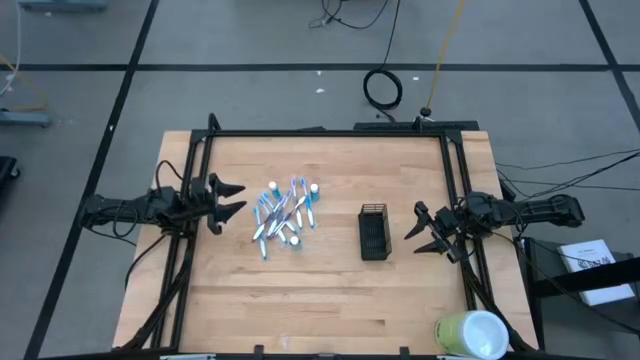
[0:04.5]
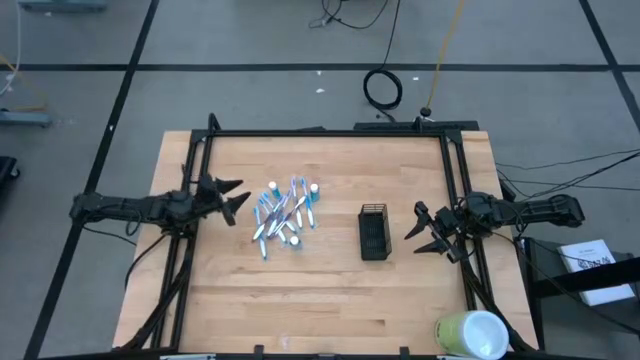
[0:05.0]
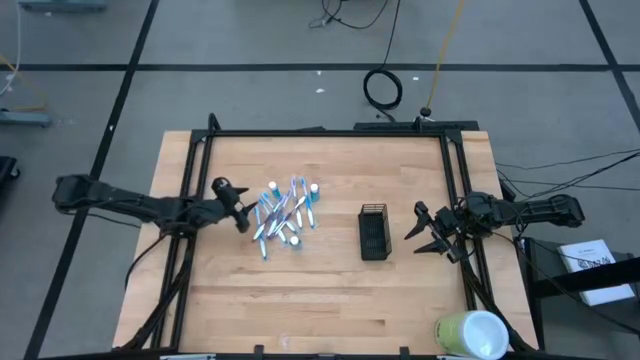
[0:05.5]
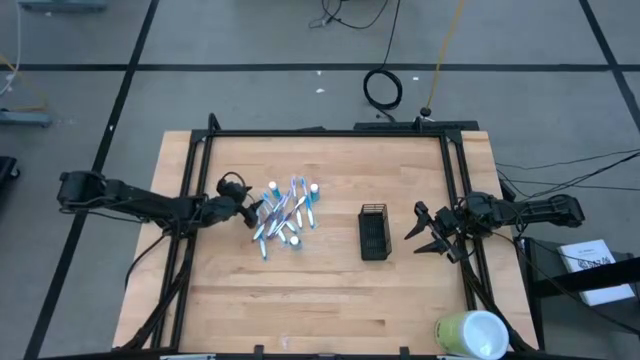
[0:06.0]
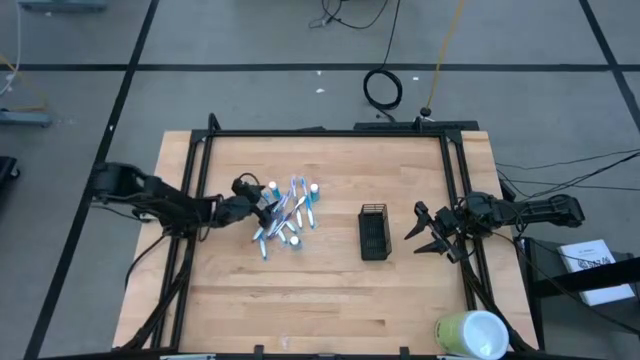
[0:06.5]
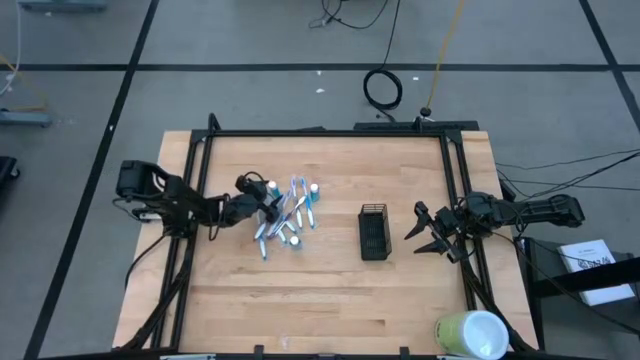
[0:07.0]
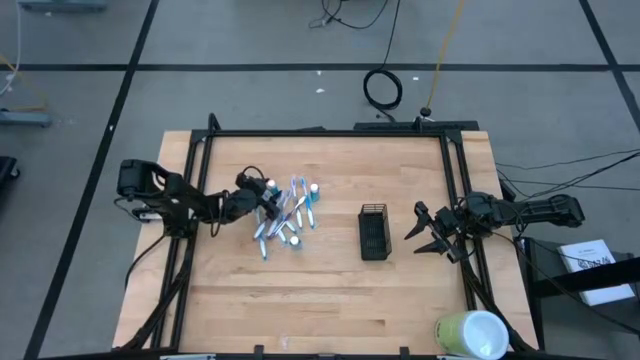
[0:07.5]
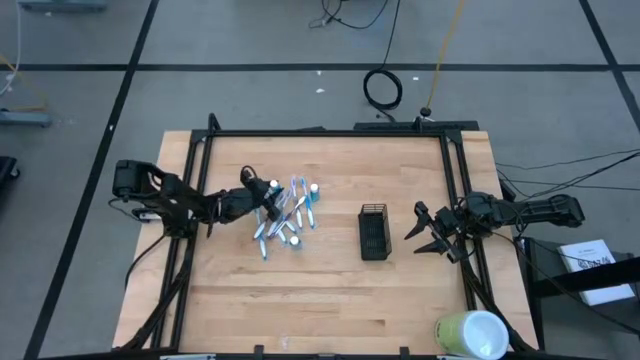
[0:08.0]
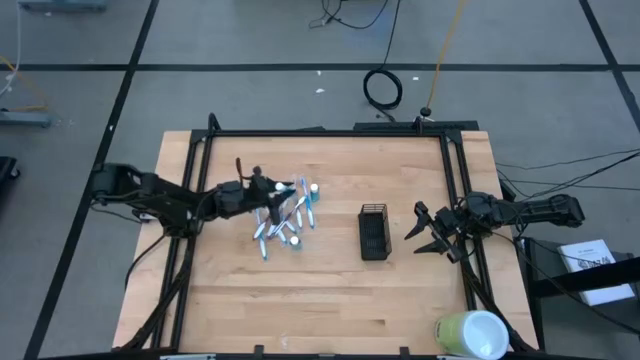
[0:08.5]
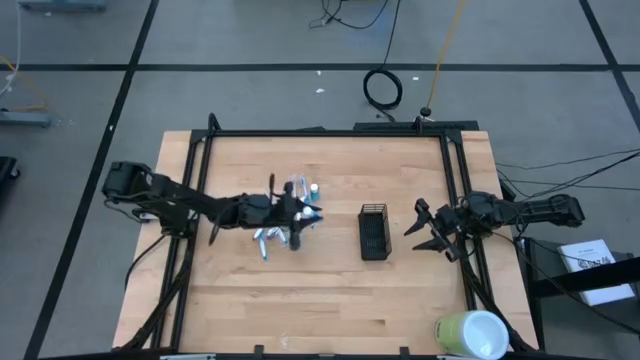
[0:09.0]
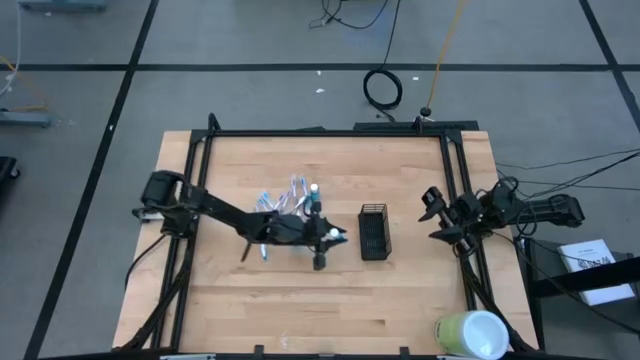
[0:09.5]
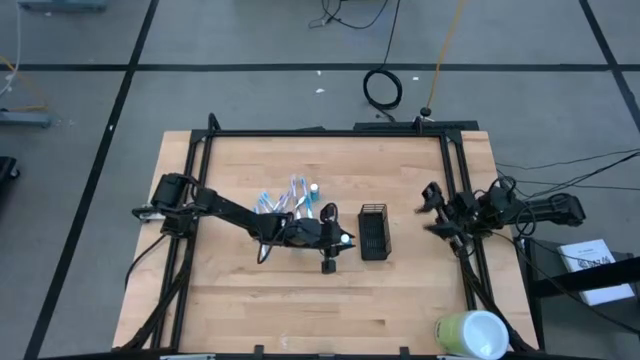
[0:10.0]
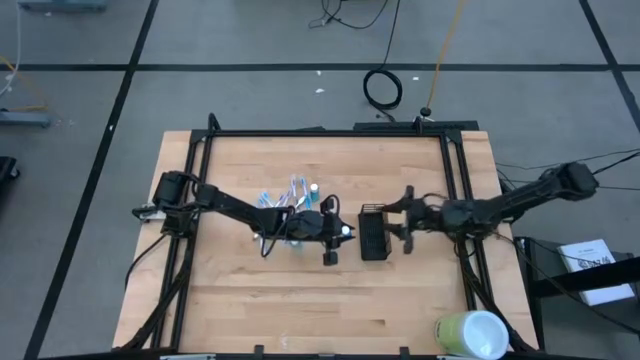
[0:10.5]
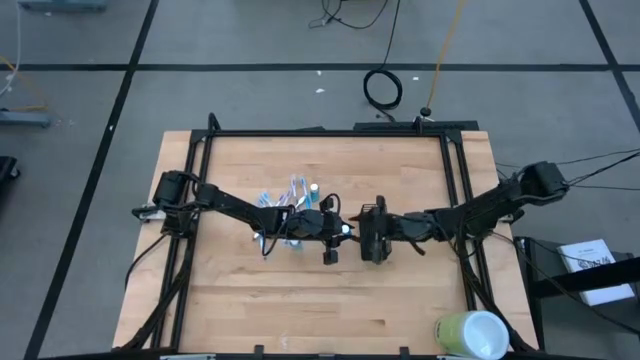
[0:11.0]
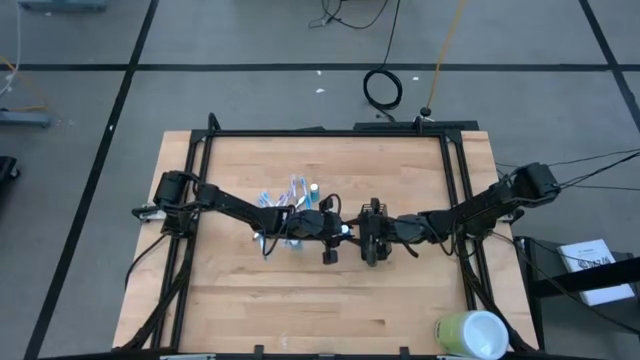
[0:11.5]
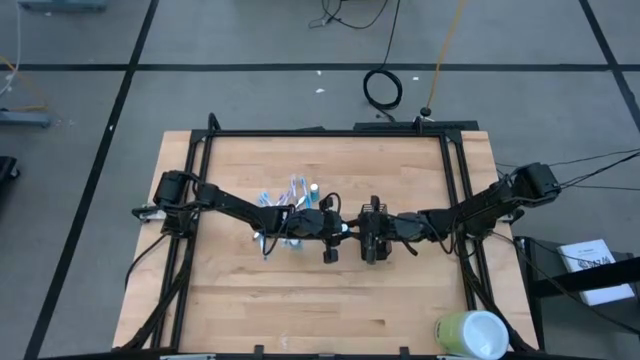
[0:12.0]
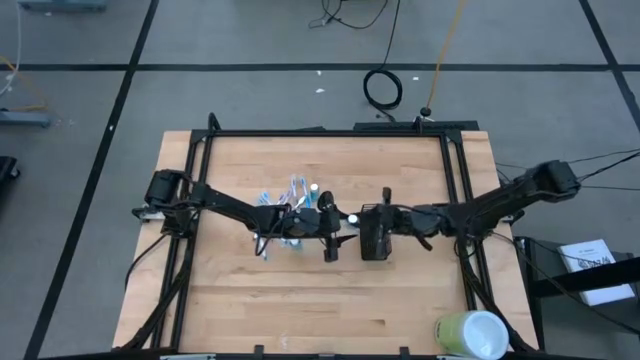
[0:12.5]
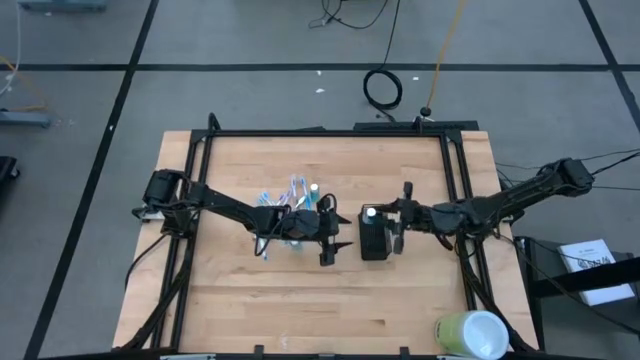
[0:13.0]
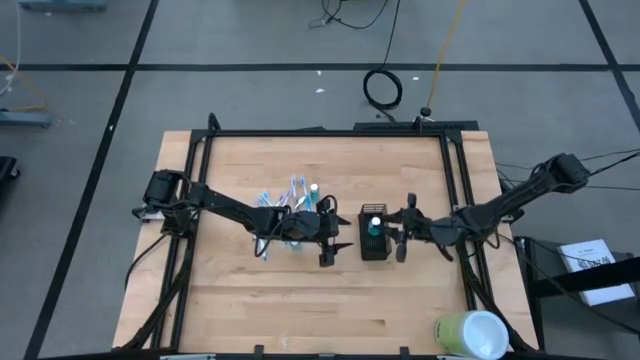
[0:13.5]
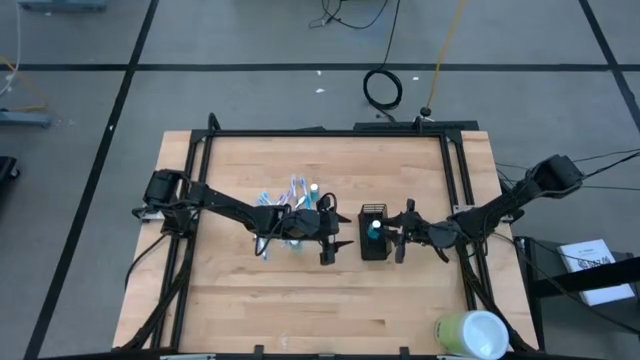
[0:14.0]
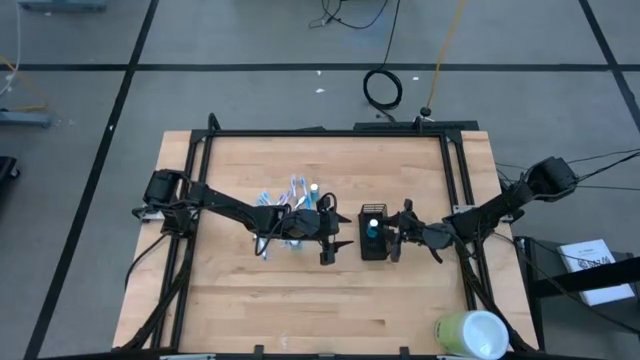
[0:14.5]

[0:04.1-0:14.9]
Task: Pick & Place toothbrushing station
Put the blue mouthwash bottle into the black organizer

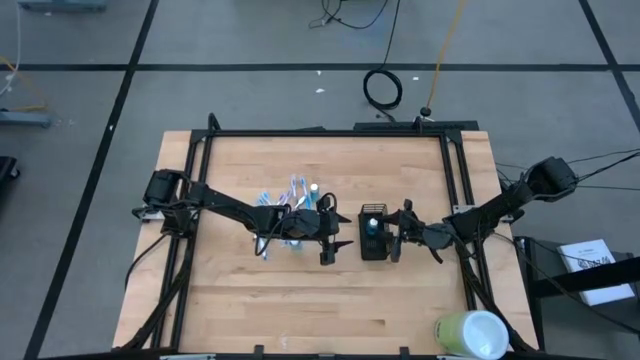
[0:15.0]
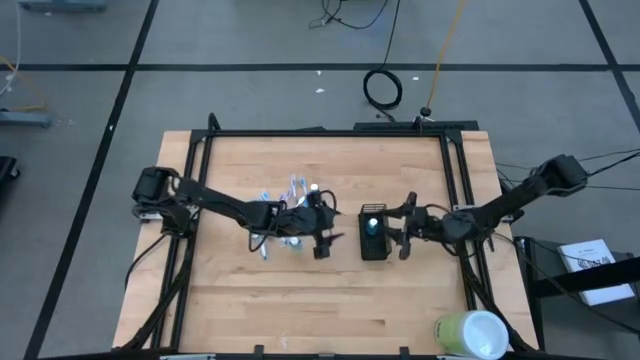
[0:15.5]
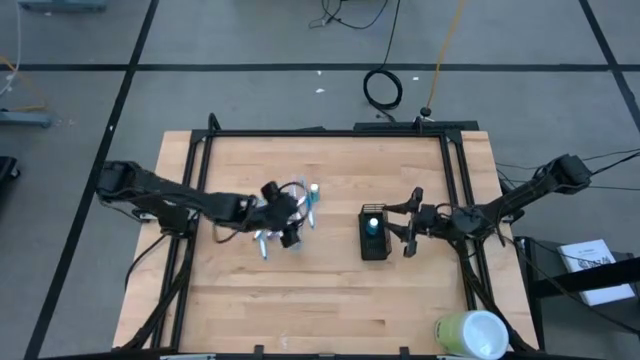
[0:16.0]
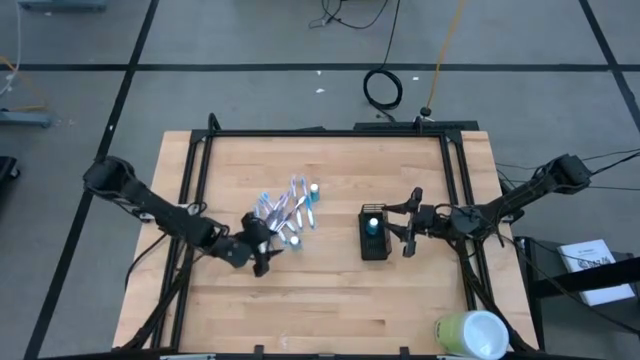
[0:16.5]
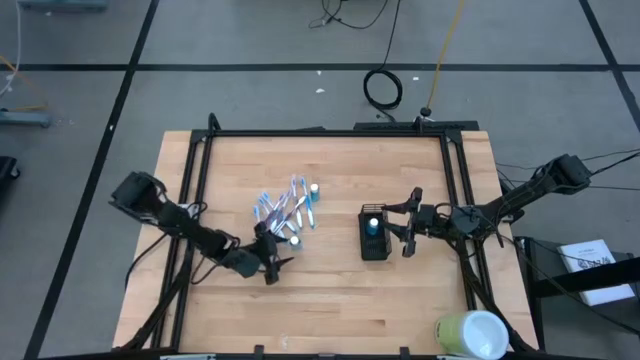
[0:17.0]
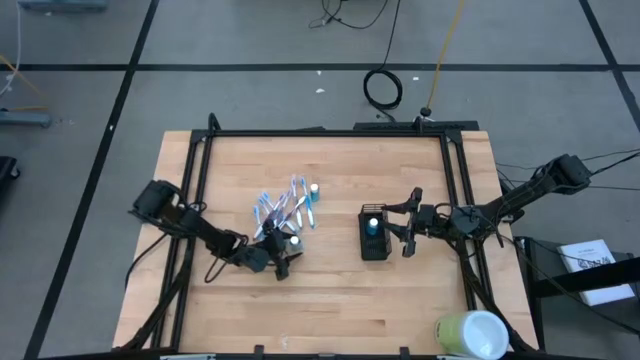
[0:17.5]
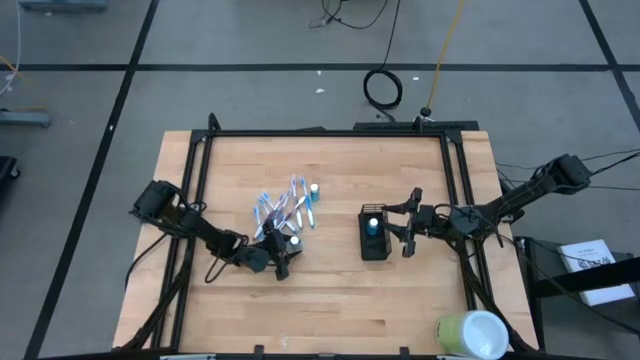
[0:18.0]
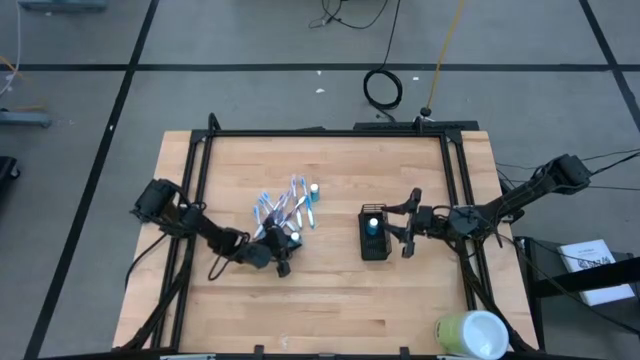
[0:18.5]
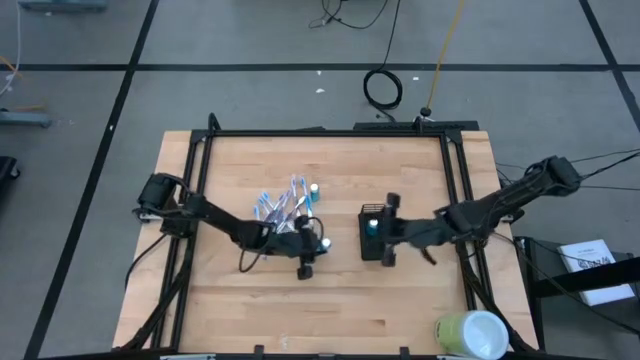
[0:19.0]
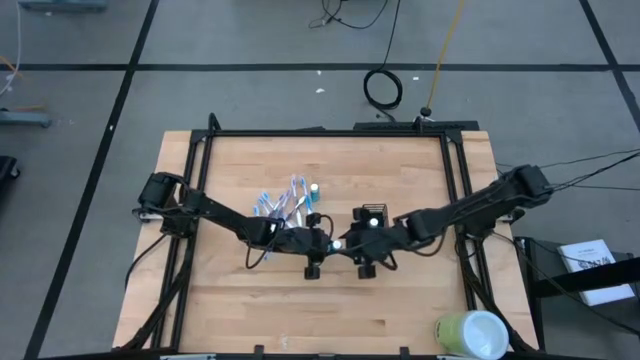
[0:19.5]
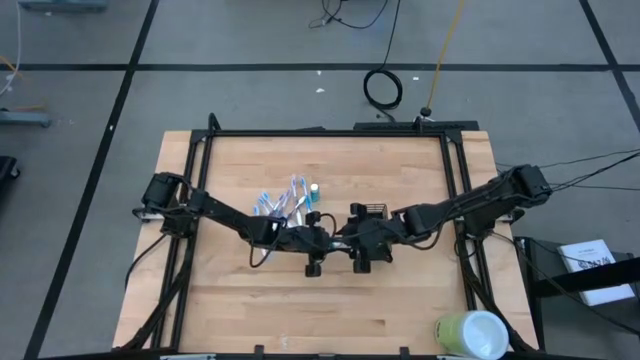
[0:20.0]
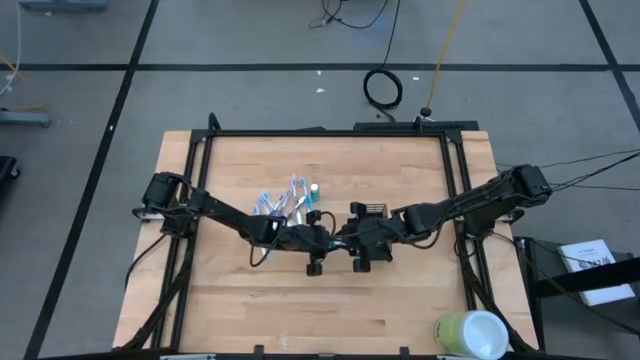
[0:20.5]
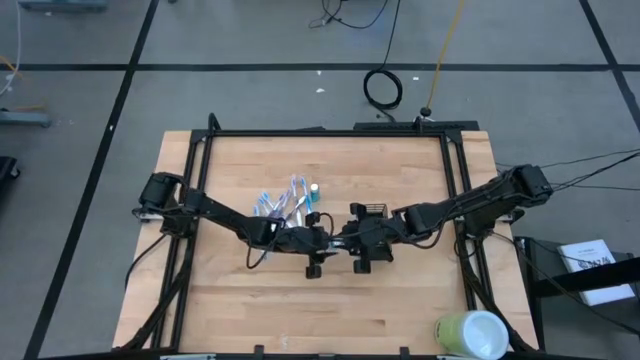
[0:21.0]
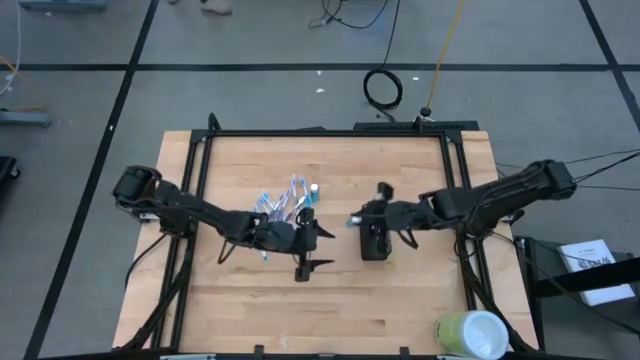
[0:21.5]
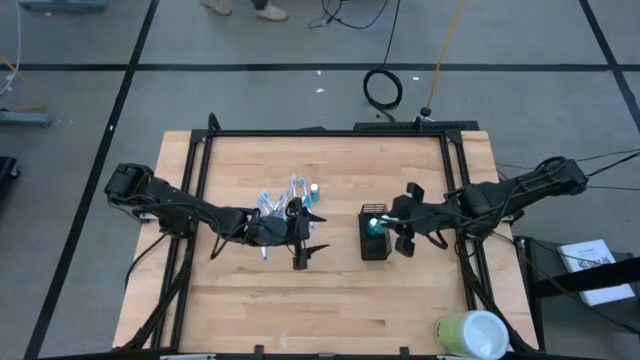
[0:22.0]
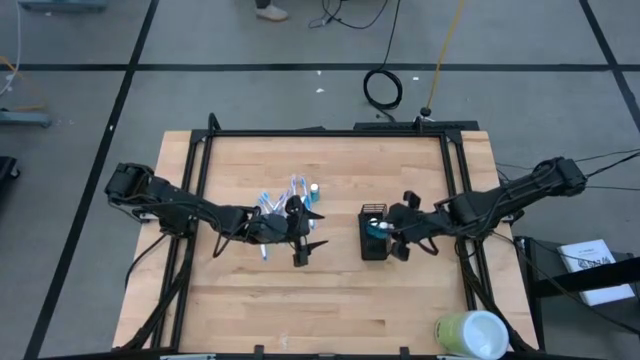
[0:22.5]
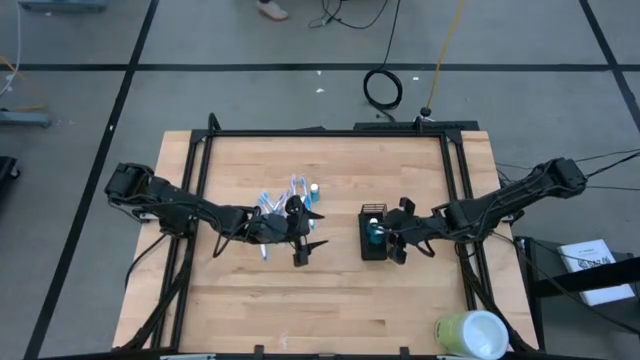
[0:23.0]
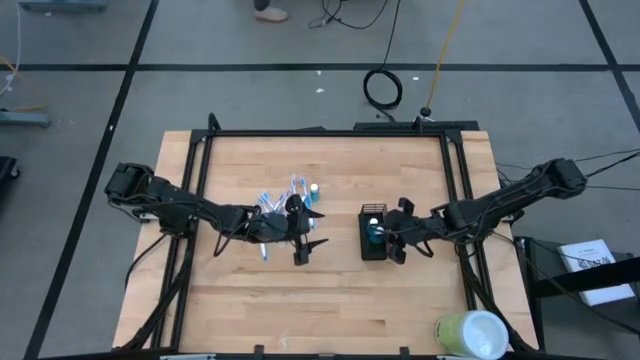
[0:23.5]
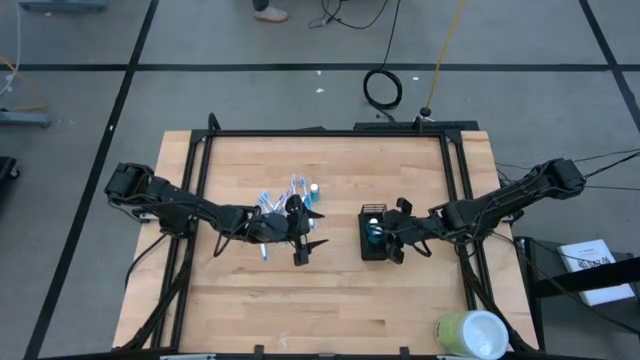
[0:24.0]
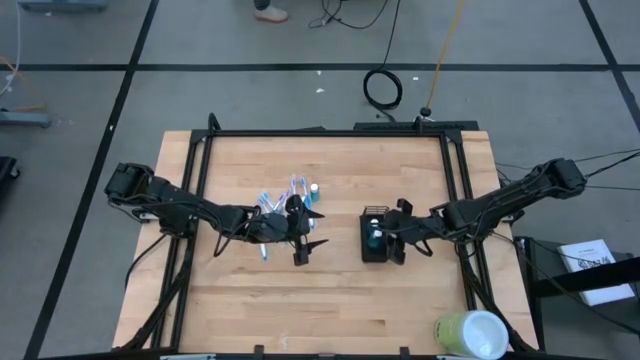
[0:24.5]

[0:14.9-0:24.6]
Put the blue mouthwash bottle into the black organizer

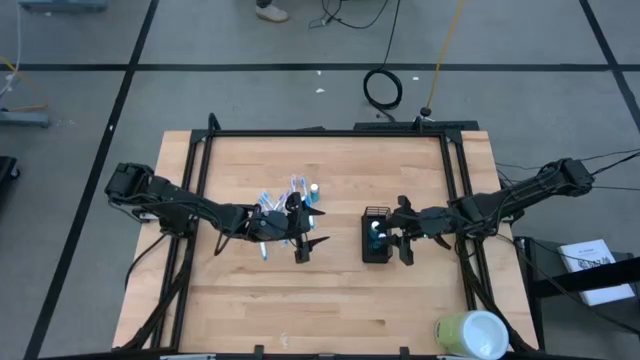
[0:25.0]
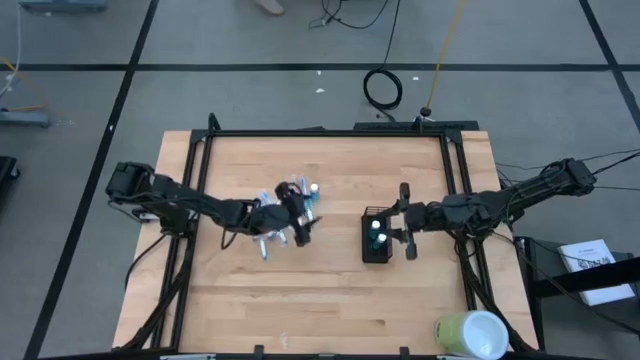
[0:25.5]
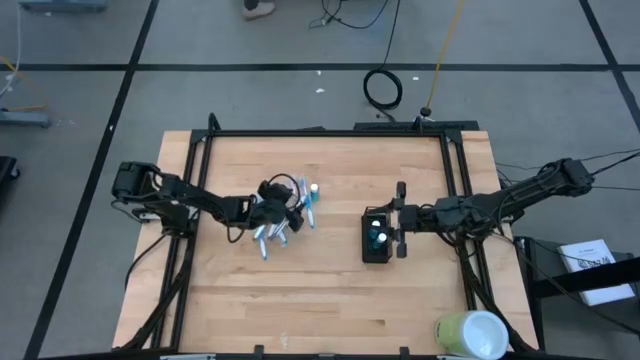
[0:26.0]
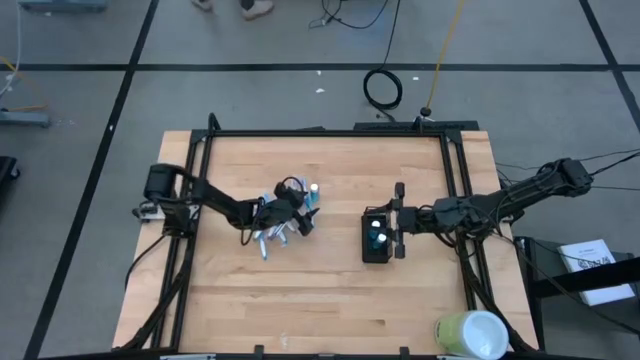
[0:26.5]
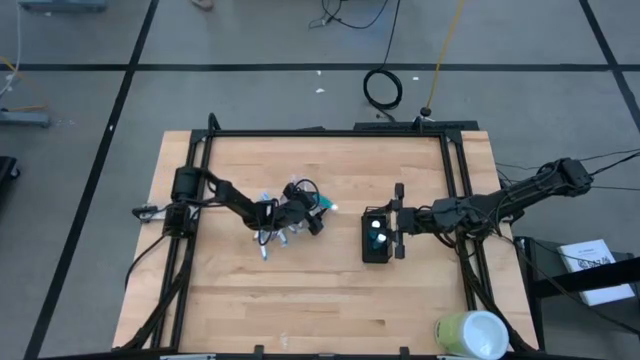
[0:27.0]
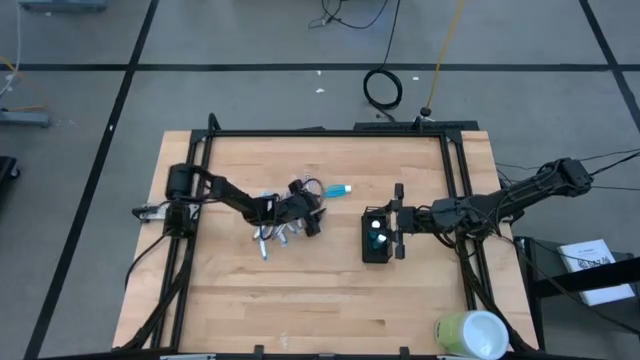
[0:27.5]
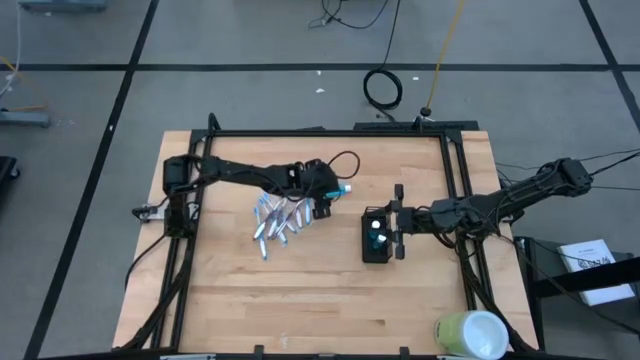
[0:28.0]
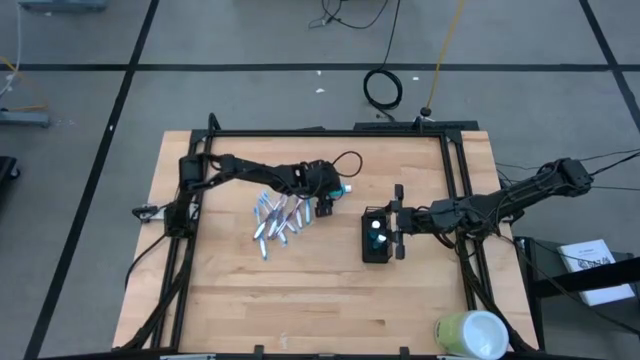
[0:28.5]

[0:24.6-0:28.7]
Put the blue mouthwash bottle into the black organizer
